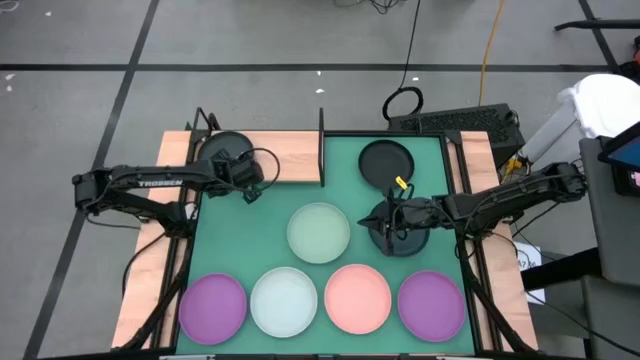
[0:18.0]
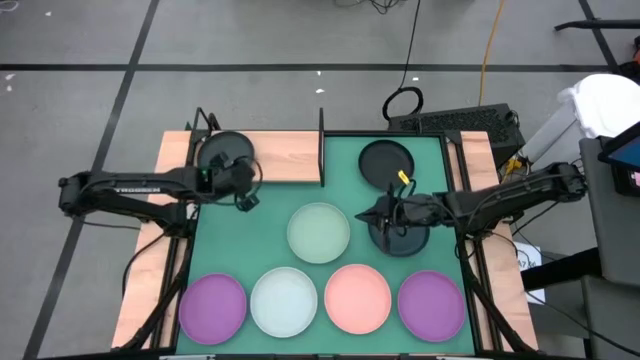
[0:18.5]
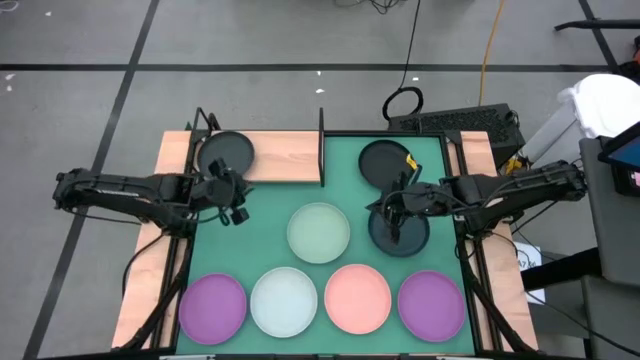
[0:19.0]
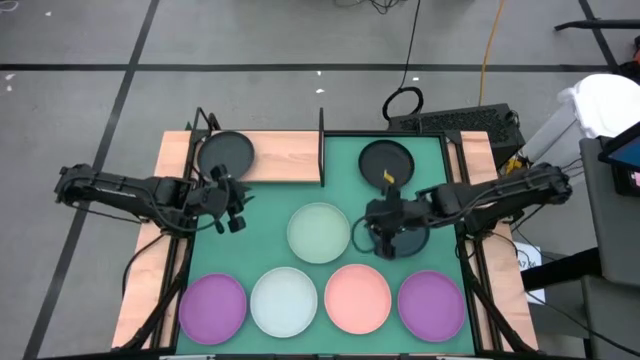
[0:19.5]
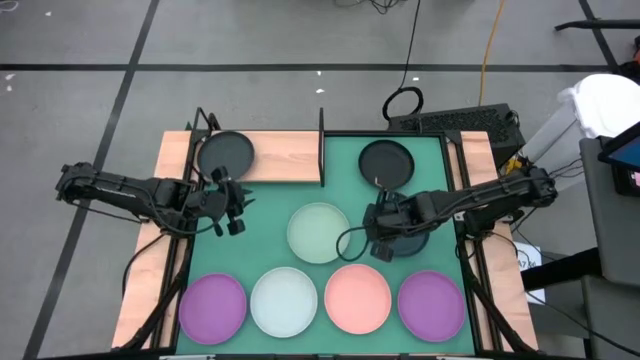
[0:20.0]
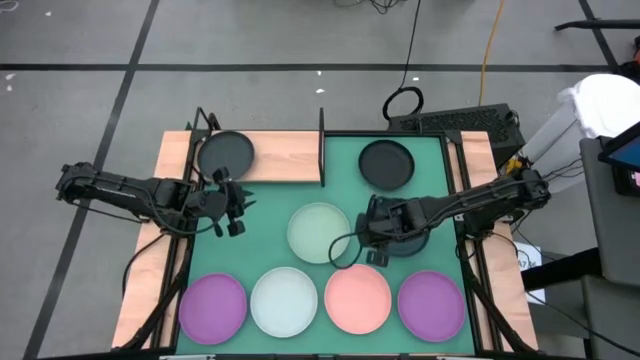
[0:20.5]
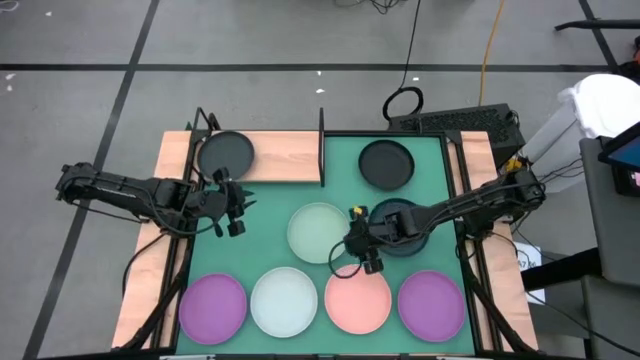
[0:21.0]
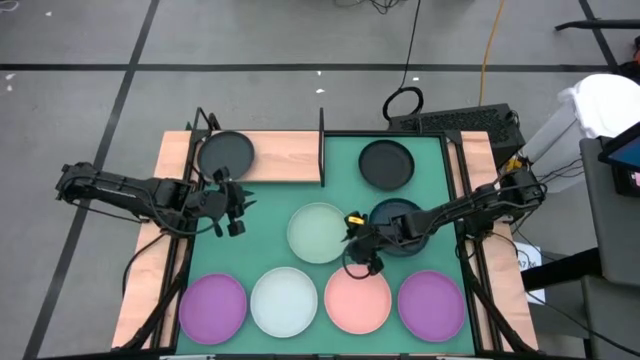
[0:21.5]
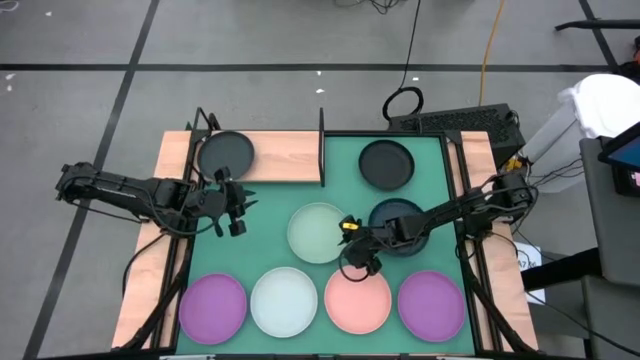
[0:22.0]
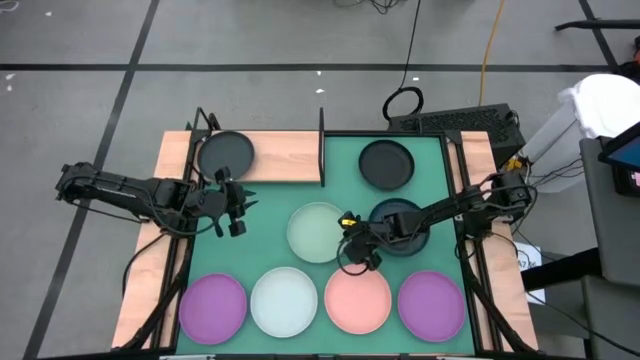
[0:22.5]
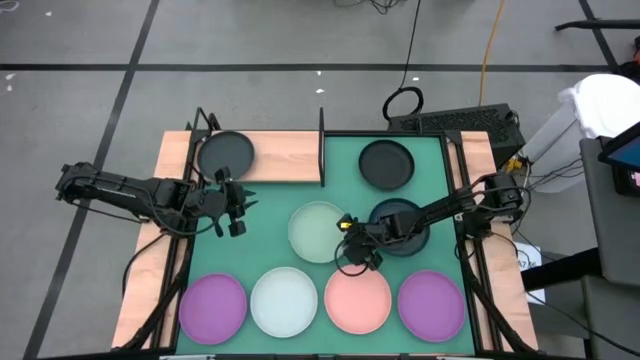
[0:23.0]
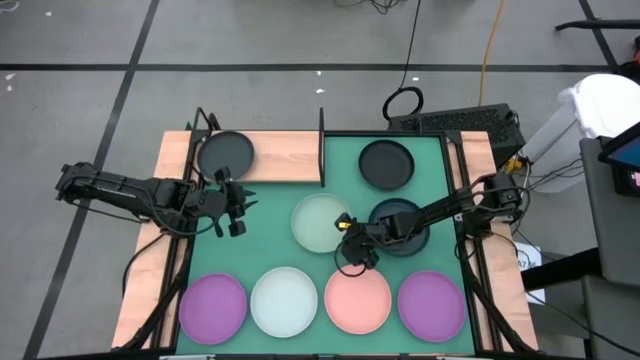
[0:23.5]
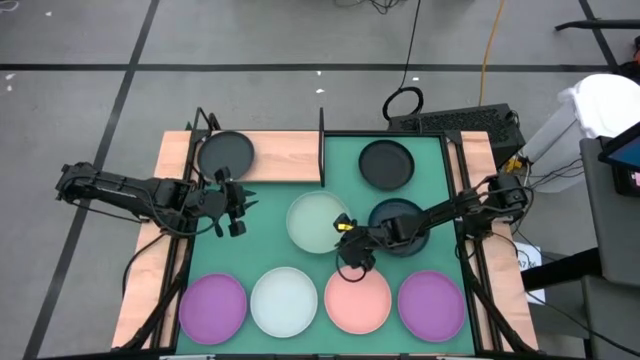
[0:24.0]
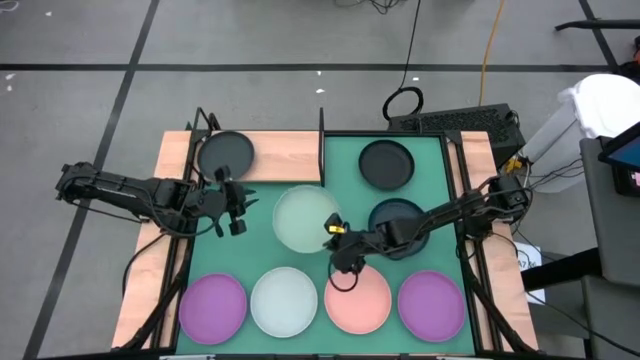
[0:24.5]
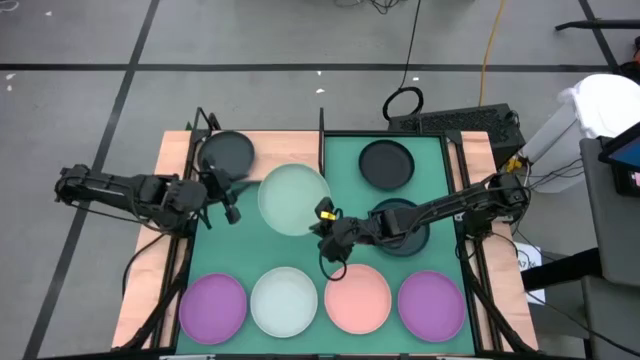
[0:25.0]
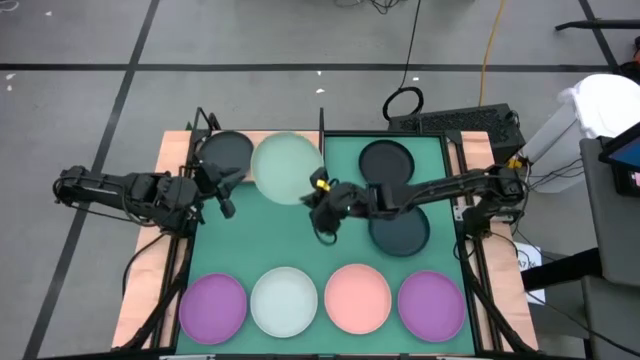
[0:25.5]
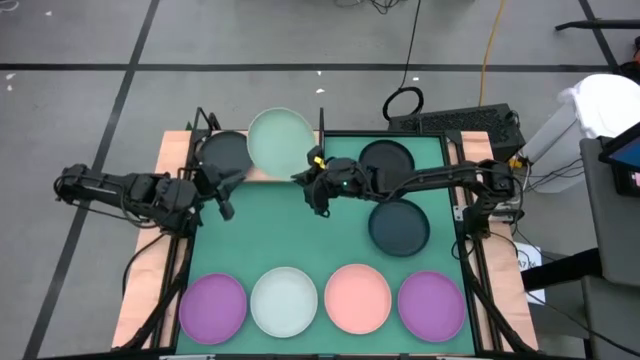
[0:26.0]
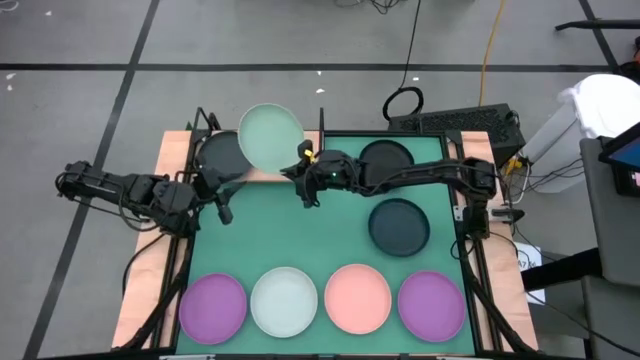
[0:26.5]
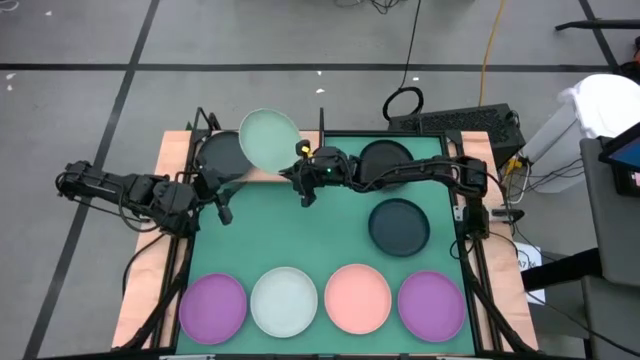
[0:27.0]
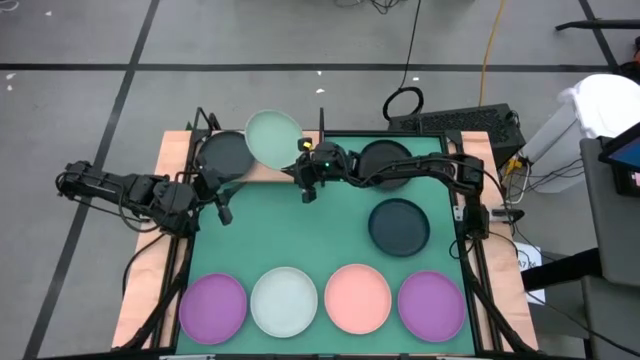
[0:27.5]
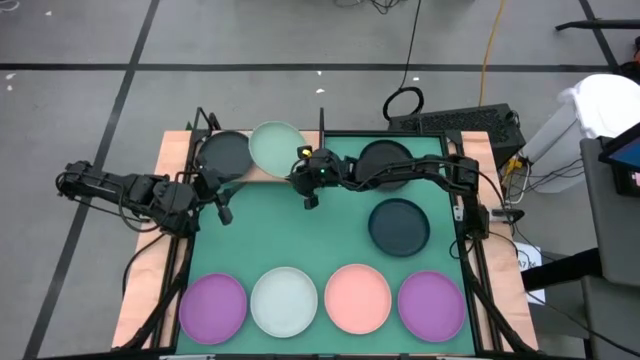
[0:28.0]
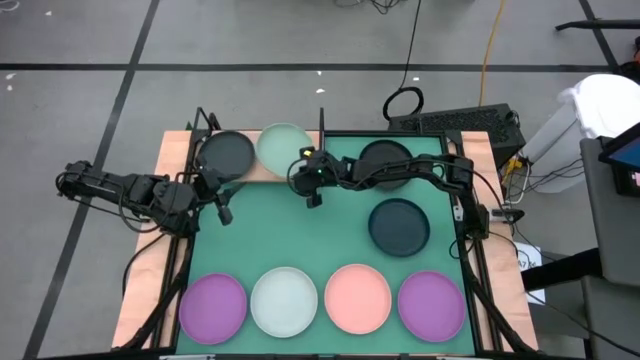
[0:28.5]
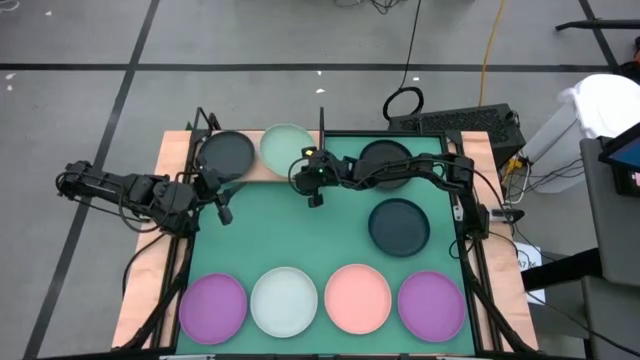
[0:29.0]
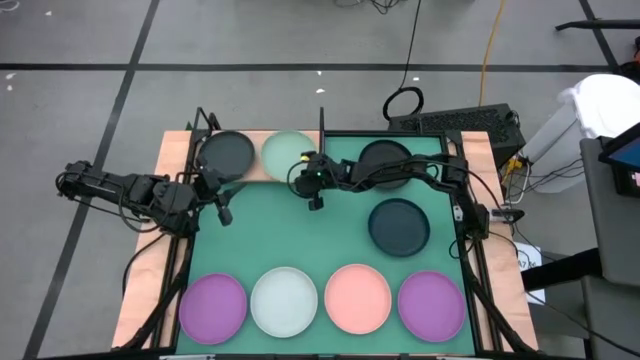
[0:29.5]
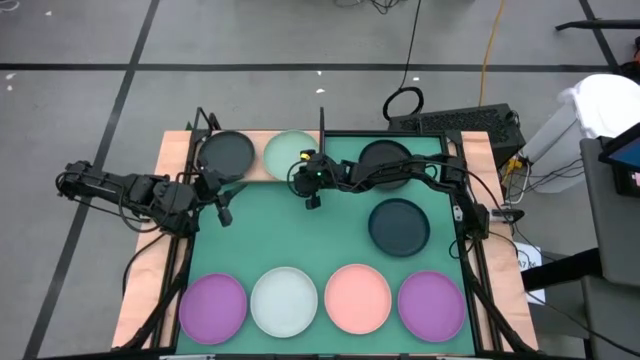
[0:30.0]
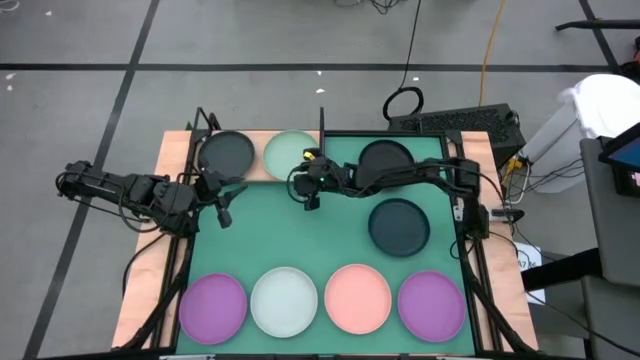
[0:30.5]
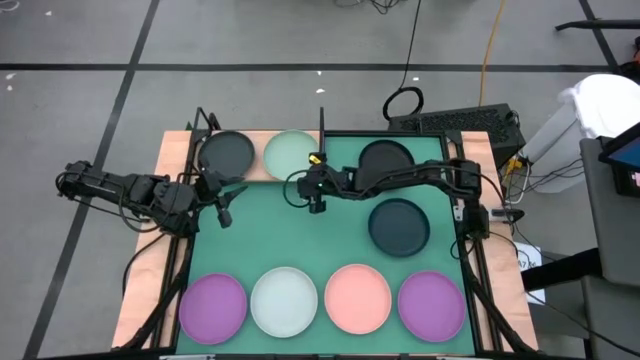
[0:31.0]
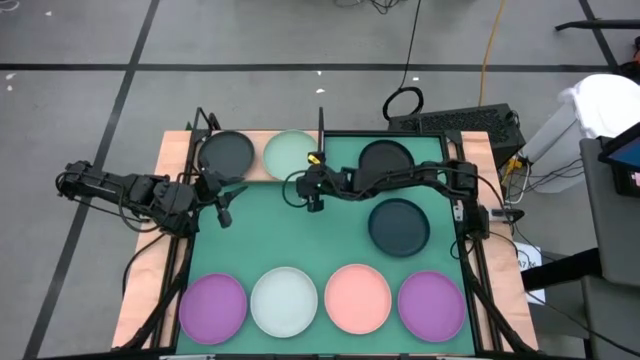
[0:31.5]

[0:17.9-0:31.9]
Task: Place and stack plates onto a shelf
Put the light green plate on the shelf

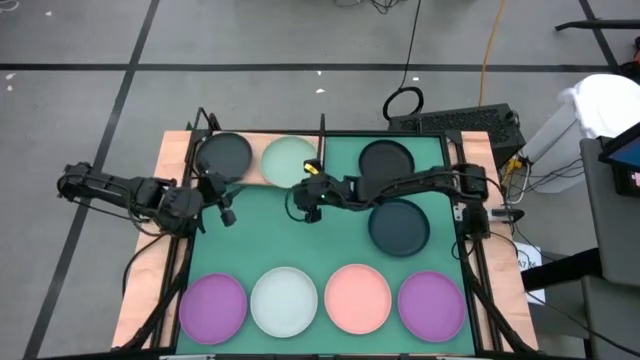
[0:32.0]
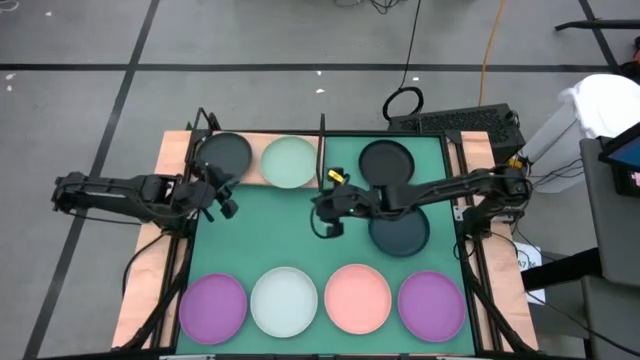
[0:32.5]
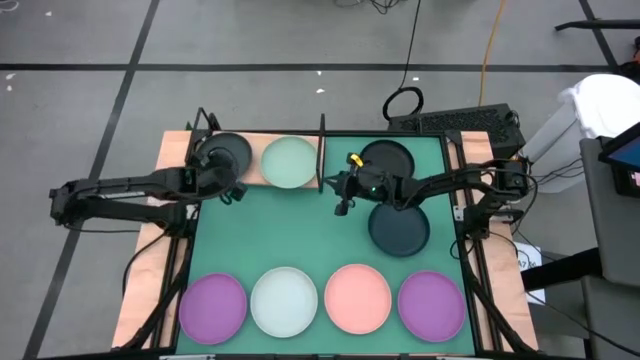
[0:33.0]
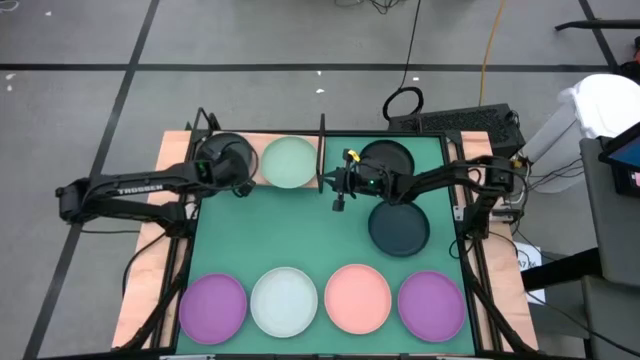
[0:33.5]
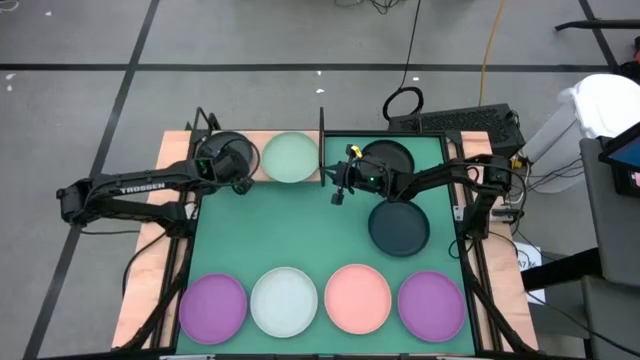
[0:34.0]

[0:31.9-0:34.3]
Adjust the shelf on the table

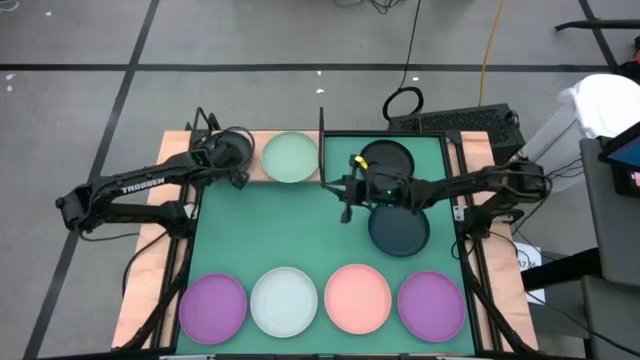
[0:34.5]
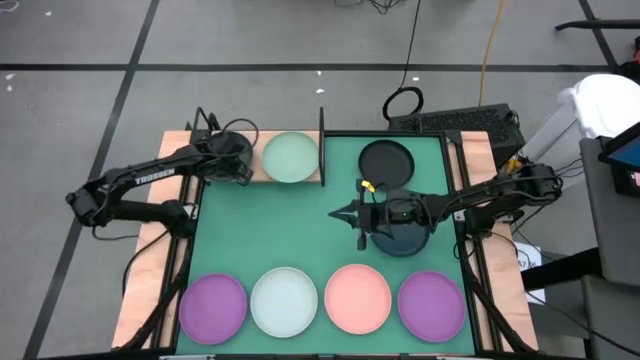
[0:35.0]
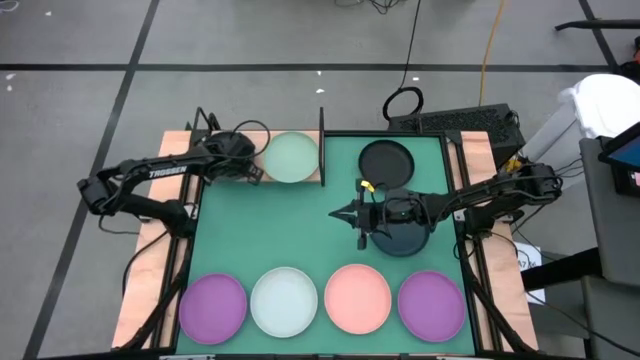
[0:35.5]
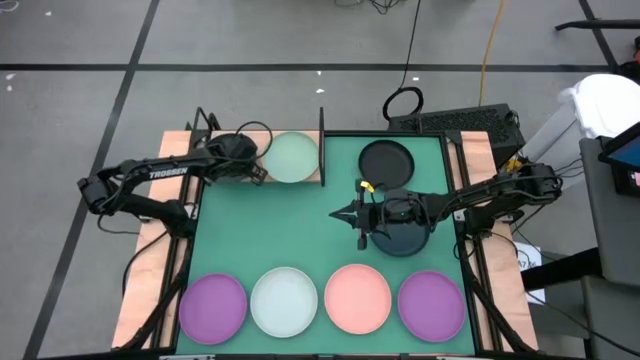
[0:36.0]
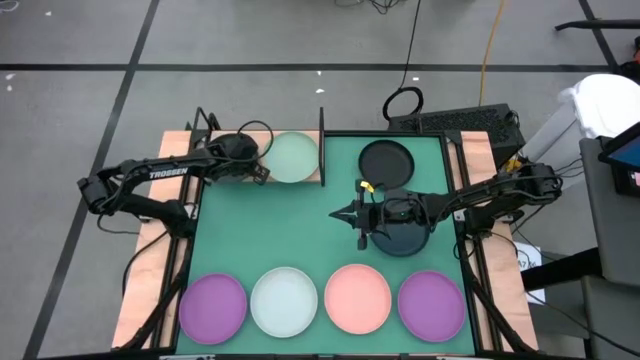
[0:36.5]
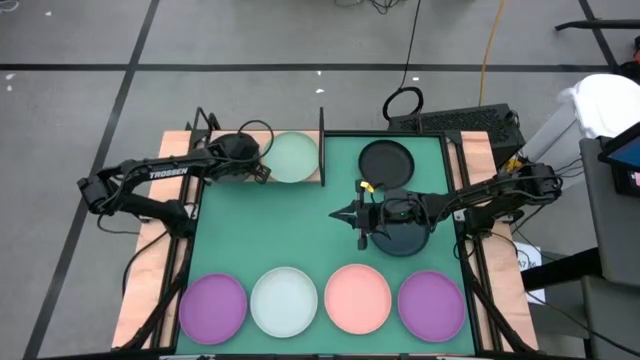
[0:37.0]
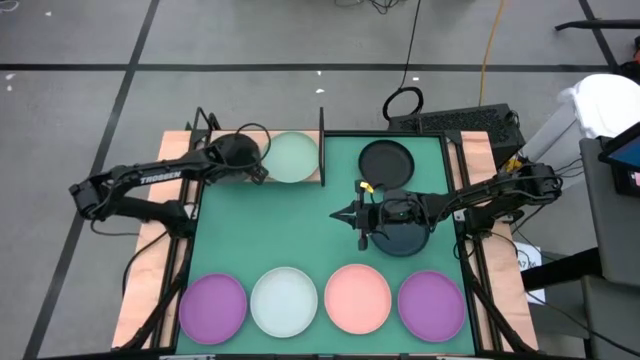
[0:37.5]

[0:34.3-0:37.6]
Adjust the black plate on the shelf
